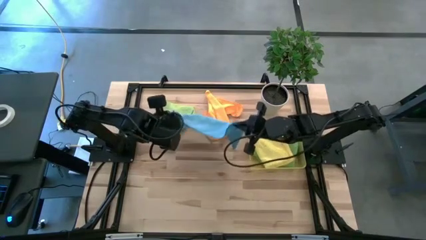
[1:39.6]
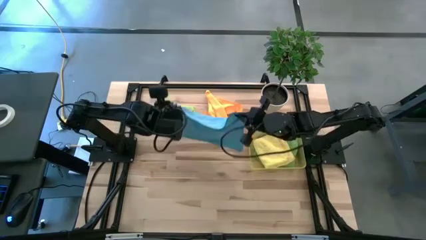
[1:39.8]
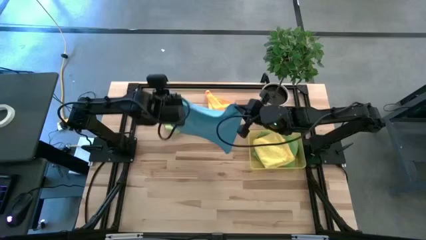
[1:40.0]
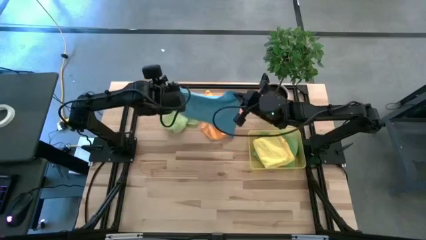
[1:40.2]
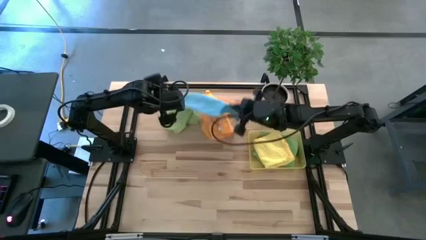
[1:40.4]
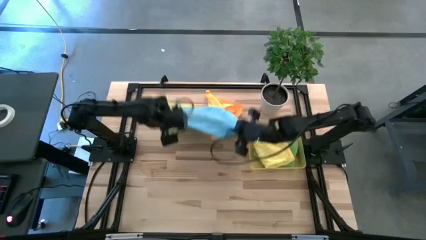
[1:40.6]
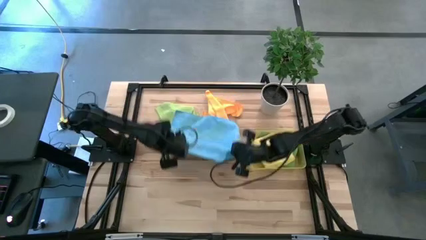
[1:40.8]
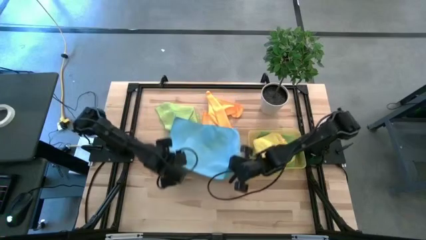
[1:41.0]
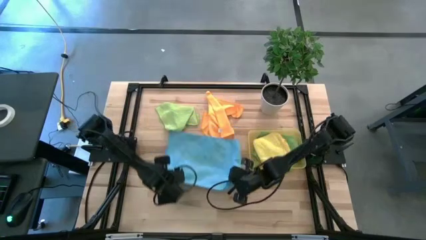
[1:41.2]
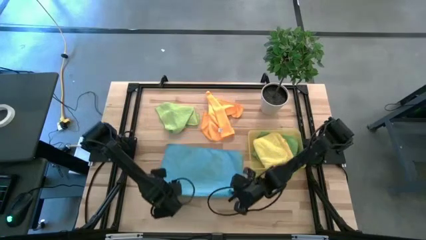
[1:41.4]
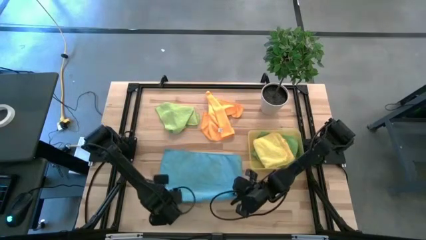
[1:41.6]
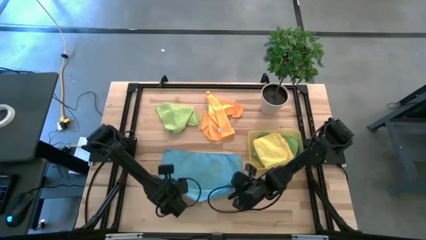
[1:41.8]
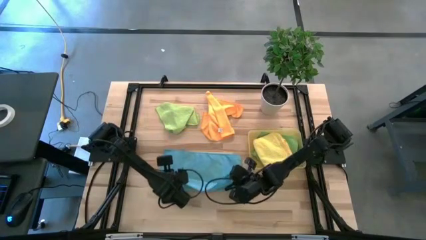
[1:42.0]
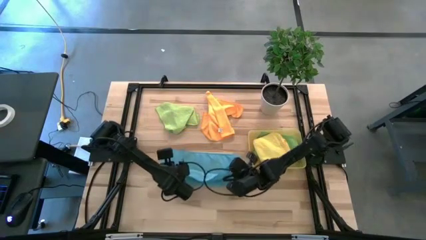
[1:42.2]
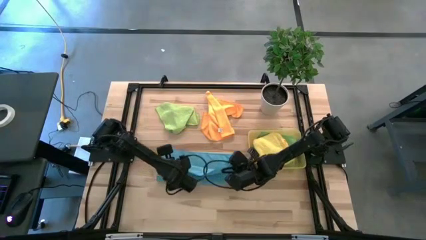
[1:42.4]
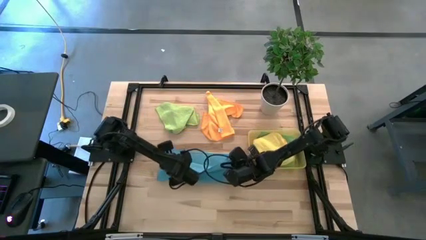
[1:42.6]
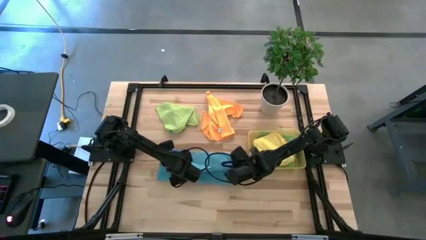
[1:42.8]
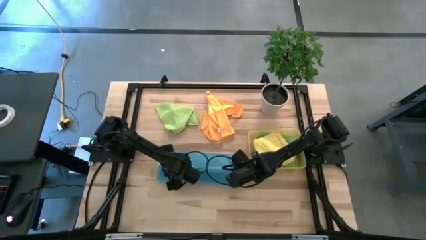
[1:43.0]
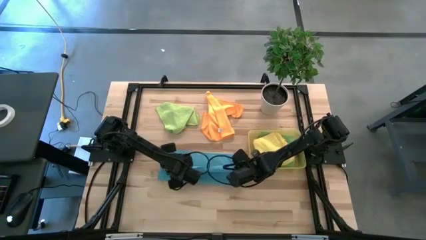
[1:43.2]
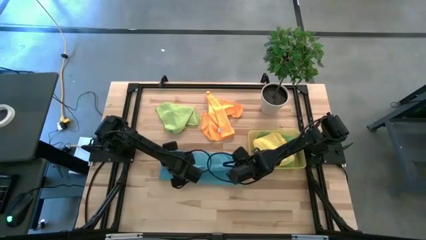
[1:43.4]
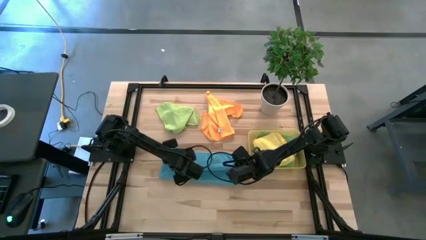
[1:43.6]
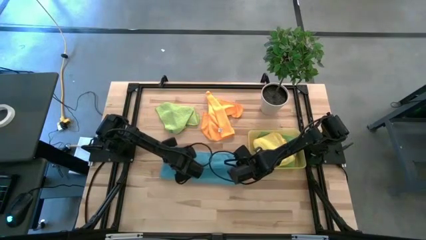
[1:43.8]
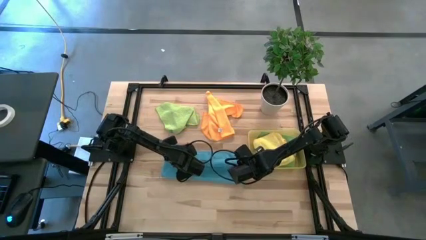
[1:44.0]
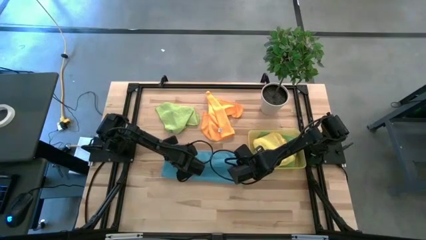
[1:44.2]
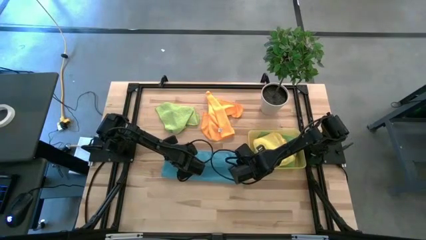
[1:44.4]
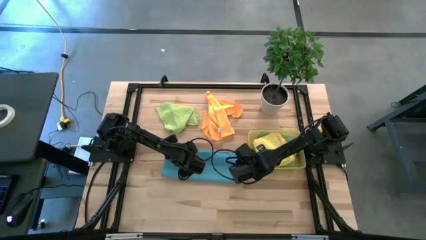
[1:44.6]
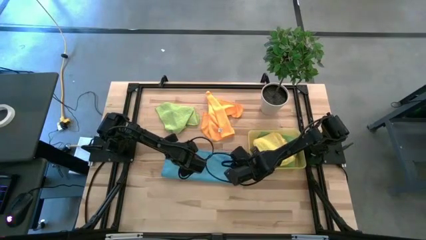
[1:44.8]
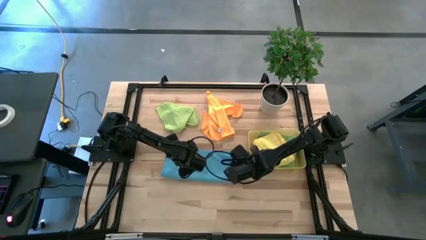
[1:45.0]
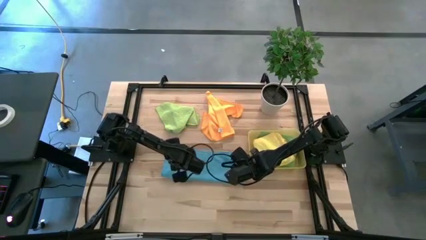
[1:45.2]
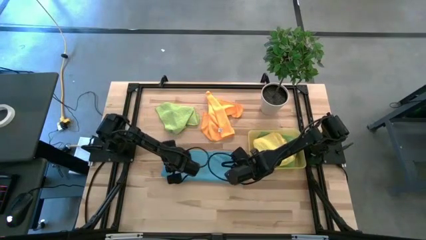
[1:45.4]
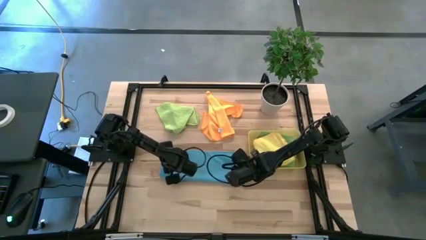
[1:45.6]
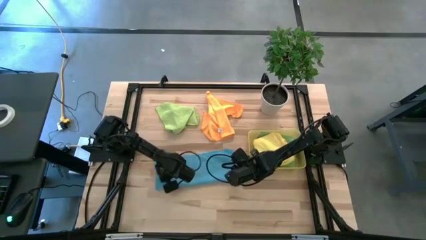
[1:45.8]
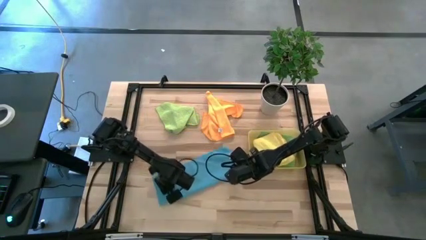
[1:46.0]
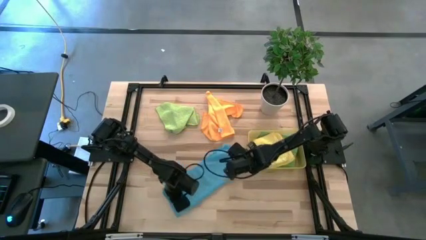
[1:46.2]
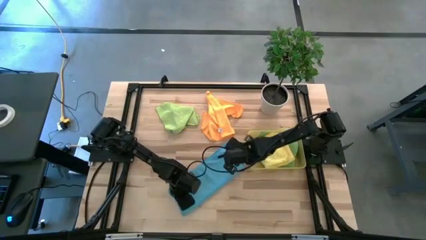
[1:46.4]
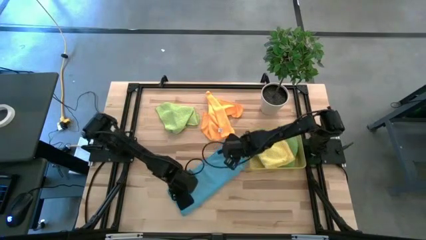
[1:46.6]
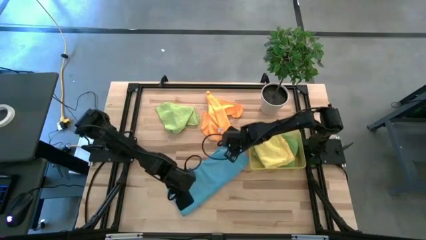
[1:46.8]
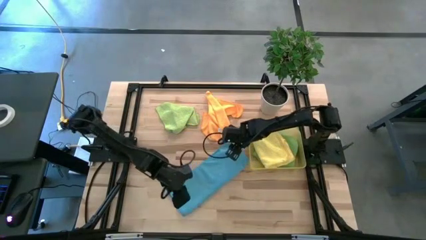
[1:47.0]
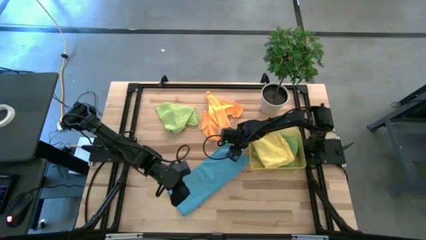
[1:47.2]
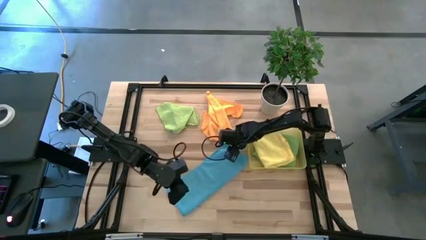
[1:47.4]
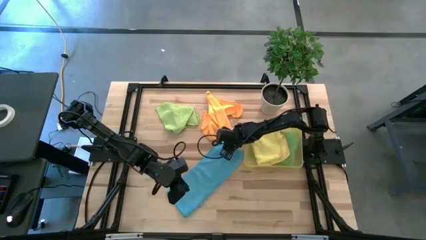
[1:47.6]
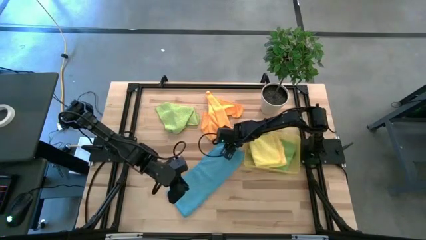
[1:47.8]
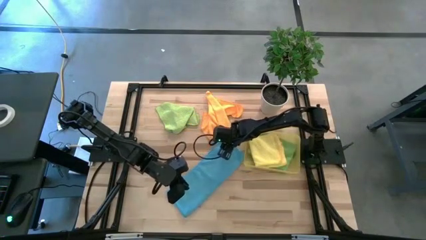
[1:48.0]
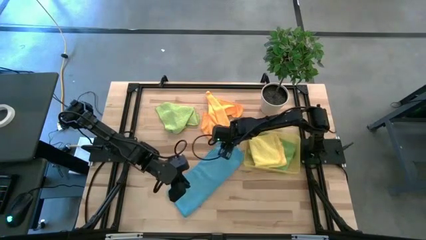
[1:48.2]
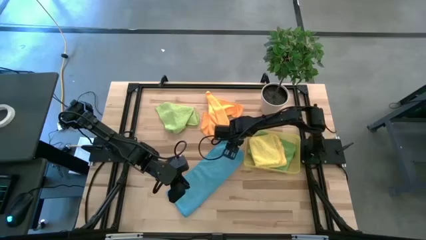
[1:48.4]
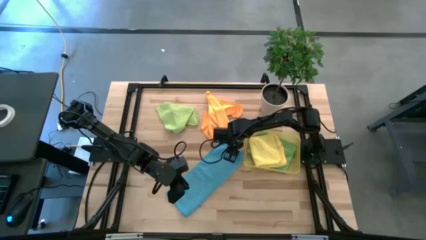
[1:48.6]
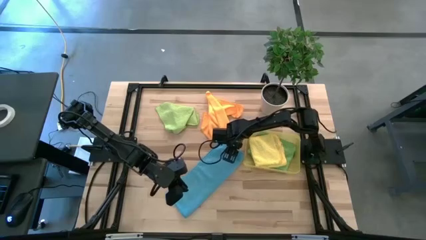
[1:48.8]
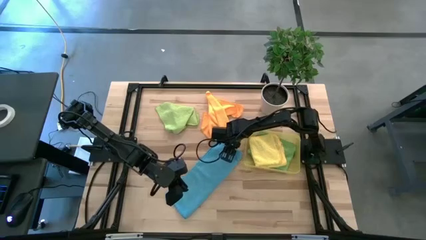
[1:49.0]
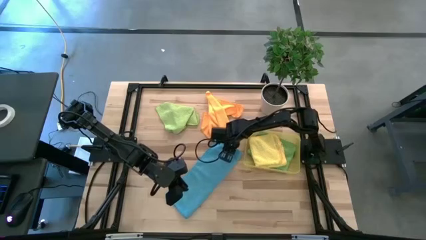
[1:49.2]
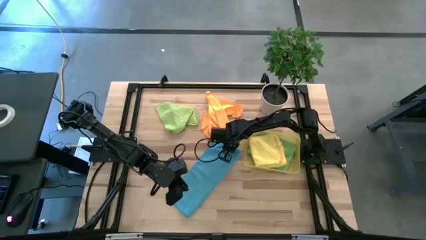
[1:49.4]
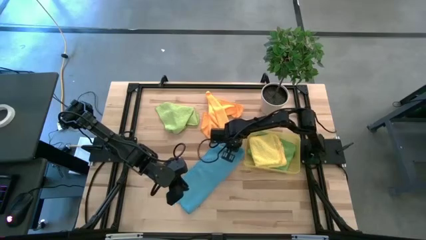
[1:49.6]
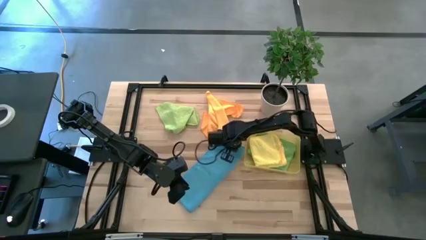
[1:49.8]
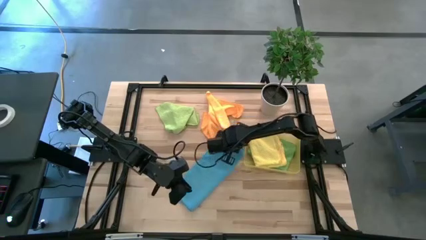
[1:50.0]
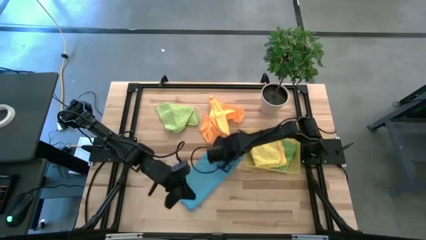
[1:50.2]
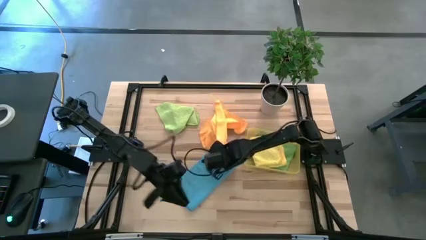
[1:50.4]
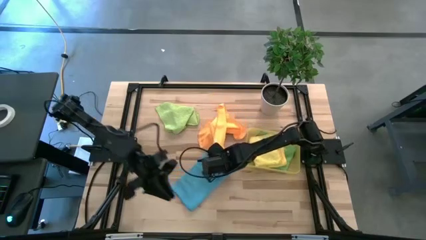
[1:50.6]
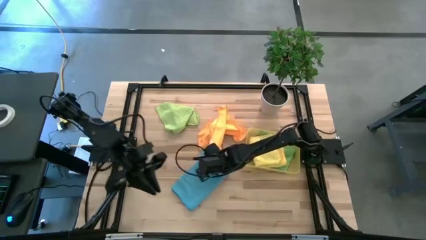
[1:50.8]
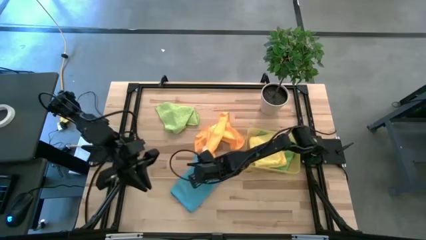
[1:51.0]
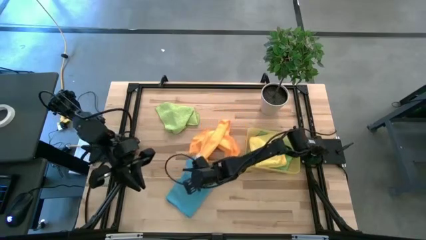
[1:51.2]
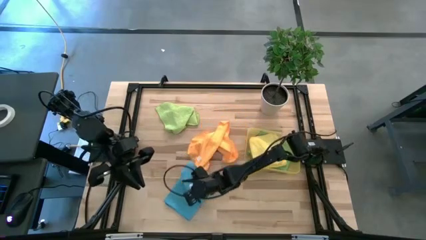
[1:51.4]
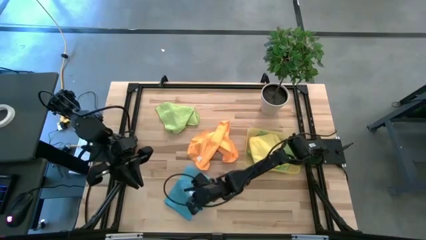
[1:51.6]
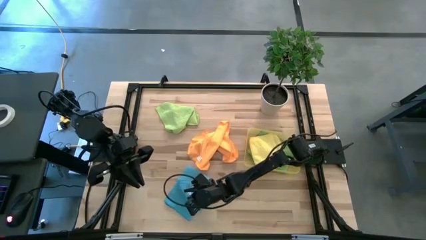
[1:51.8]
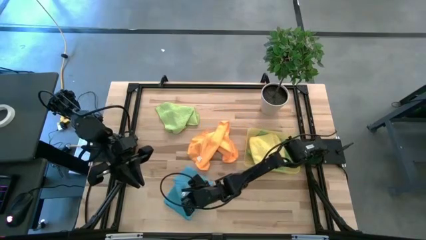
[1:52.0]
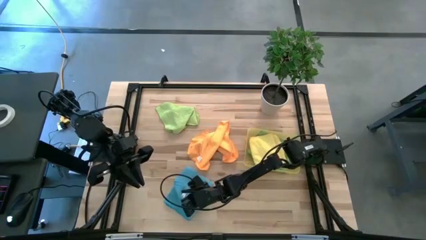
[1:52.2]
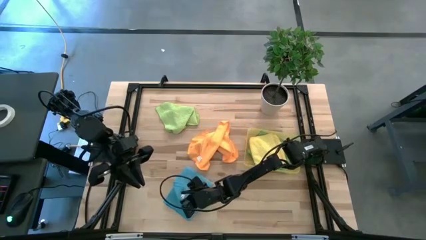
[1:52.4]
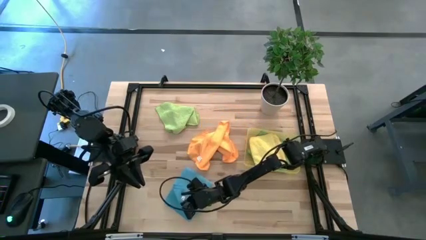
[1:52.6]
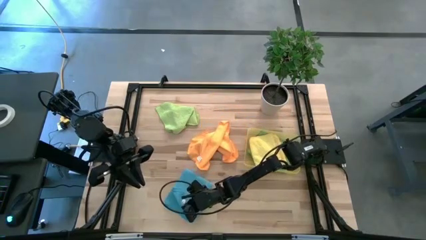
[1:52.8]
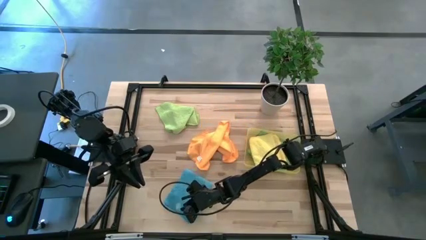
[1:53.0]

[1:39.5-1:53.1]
Task: Fold microfiber towels
Fold the blue microfiber cloth

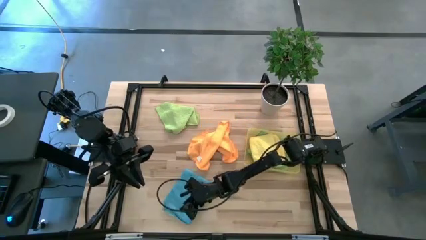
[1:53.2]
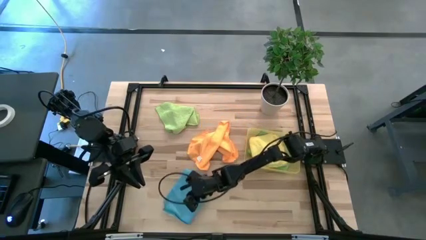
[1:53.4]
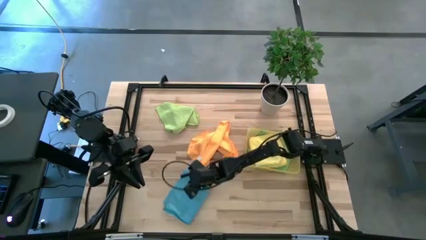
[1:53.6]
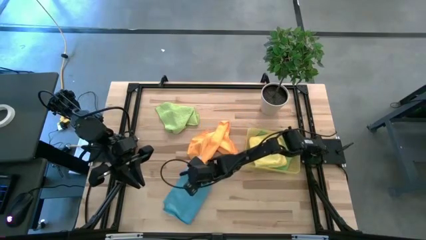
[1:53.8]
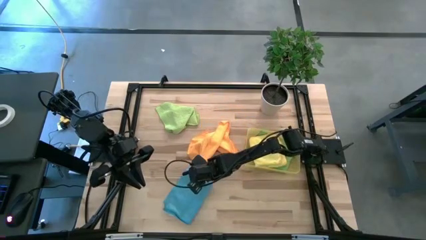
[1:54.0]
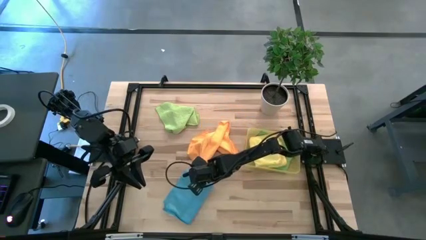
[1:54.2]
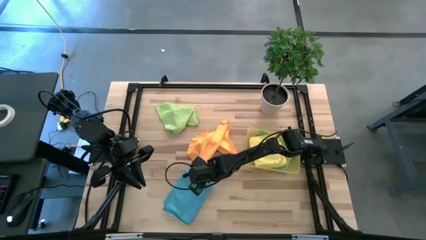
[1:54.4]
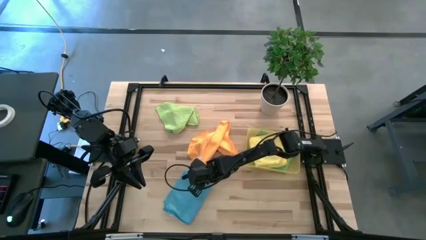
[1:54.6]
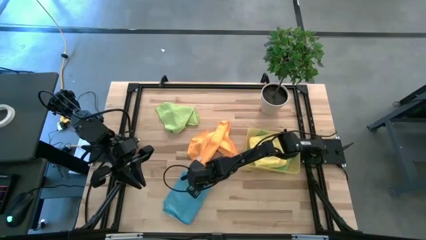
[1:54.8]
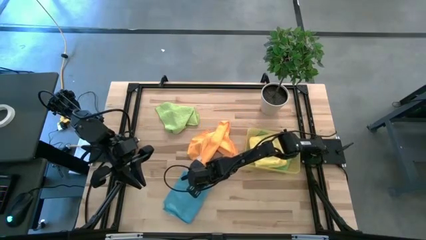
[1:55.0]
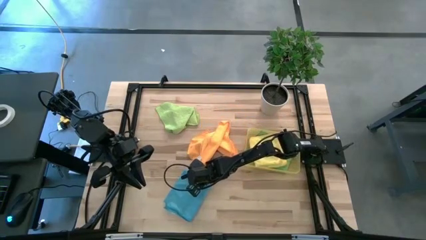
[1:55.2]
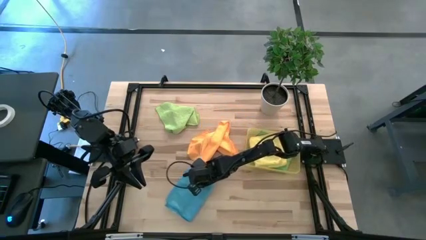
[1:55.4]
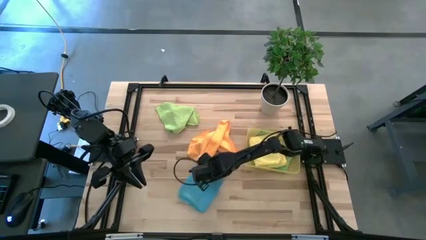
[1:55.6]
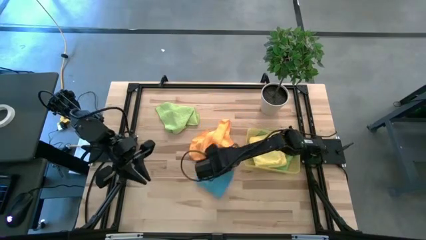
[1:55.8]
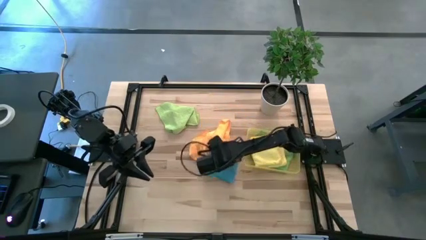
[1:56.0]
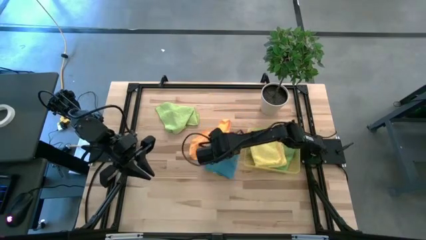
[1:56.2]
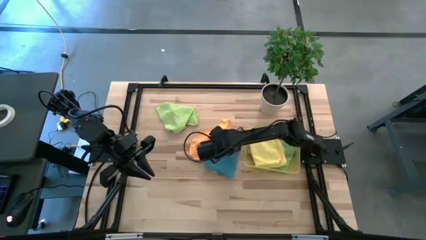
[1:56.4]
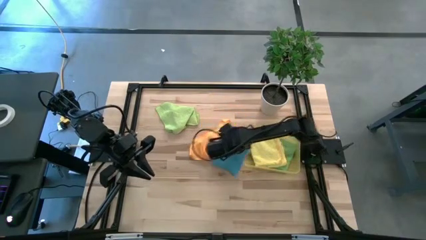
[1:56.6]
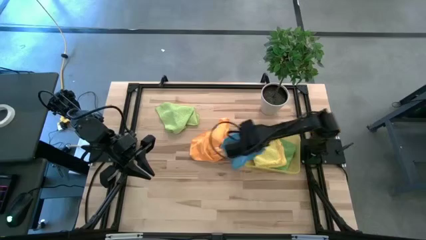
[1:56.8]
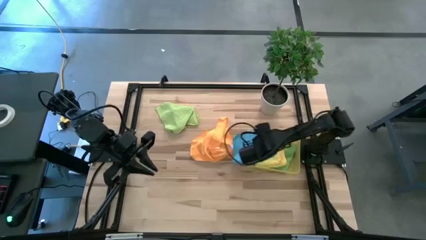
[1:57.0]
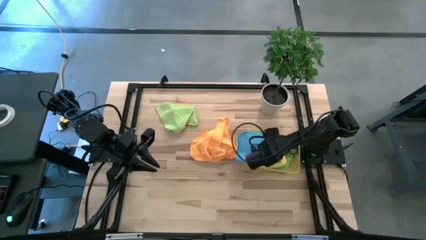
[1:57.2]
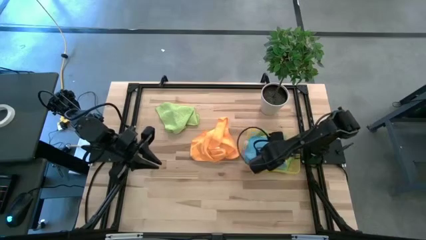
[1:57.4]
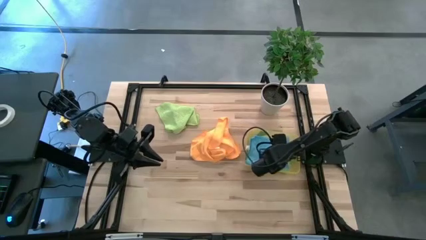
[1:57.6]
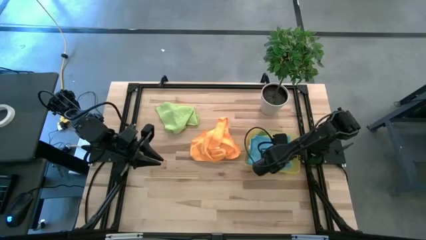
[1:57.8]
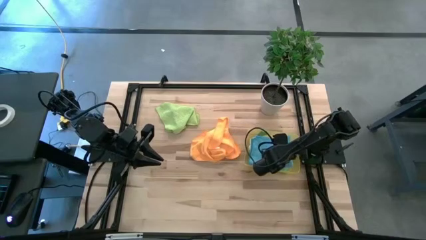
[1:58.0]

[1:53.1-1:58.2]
Put the blue microfiber cloth into the yellow bin
